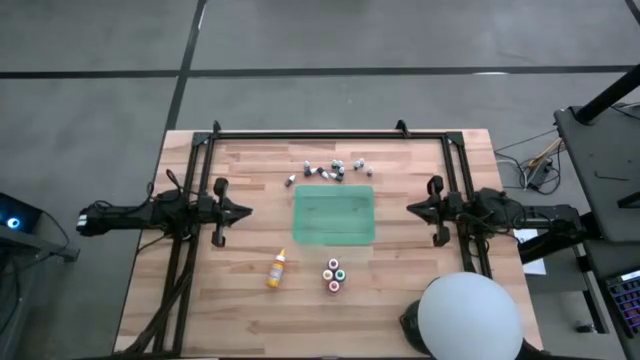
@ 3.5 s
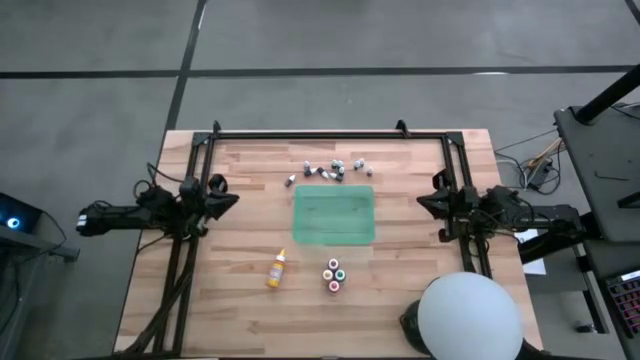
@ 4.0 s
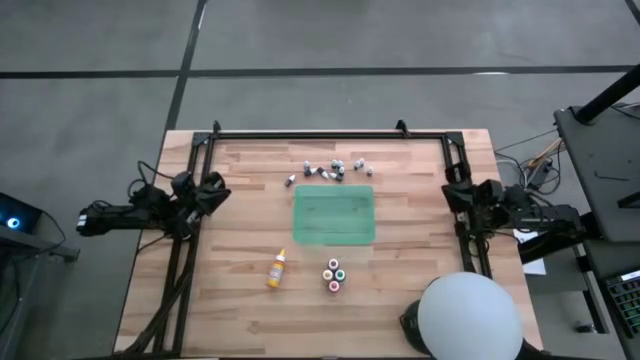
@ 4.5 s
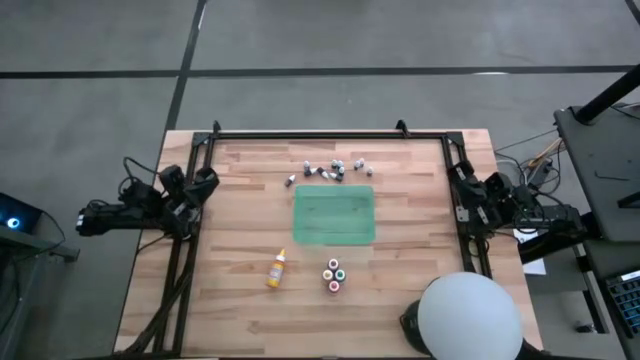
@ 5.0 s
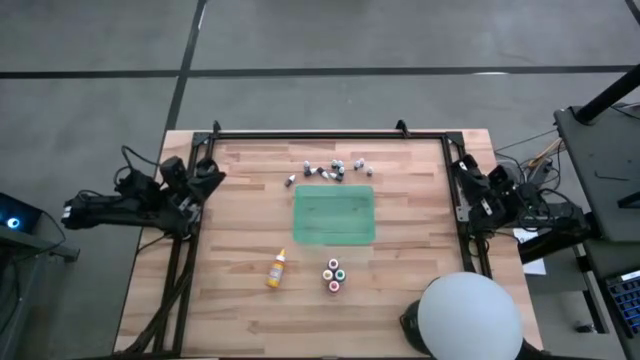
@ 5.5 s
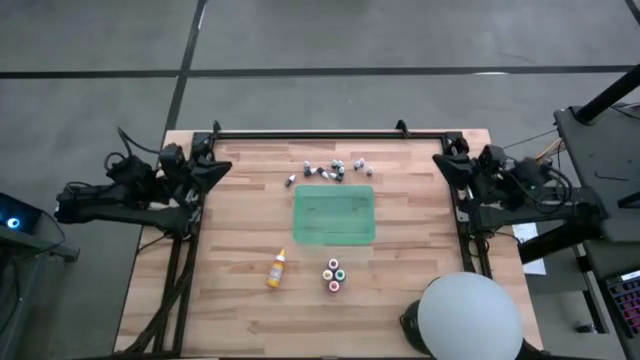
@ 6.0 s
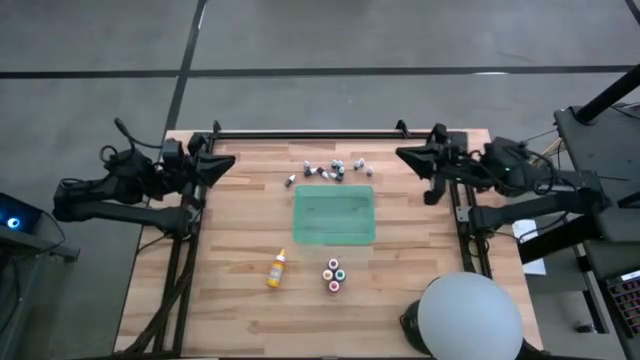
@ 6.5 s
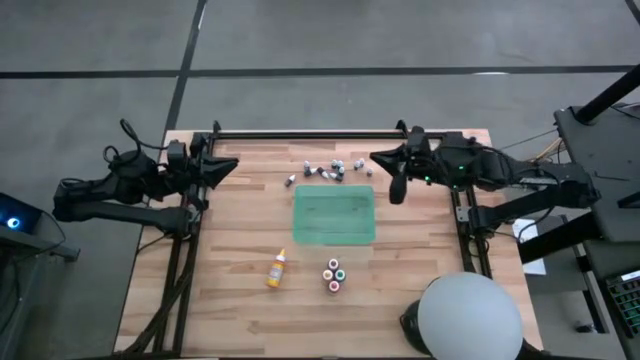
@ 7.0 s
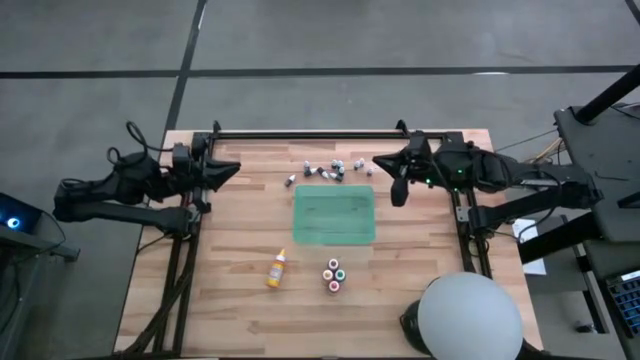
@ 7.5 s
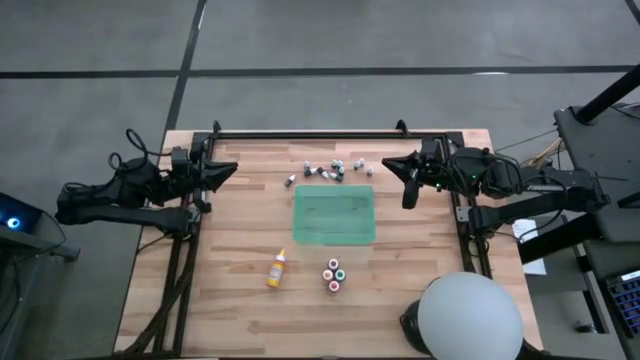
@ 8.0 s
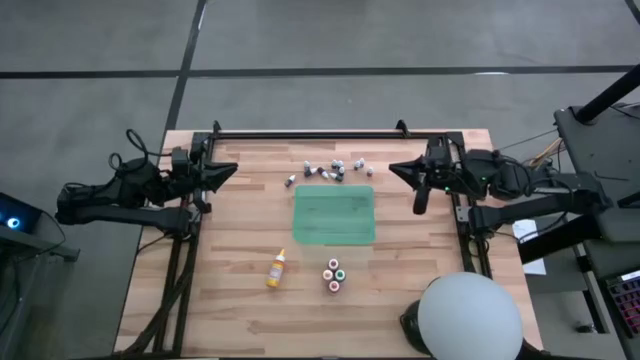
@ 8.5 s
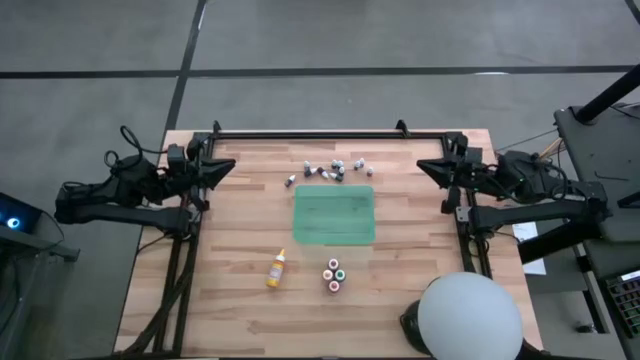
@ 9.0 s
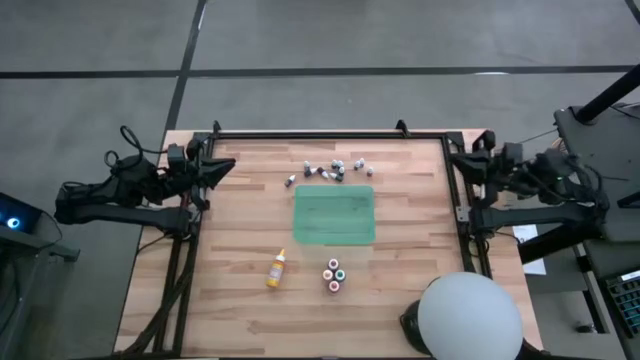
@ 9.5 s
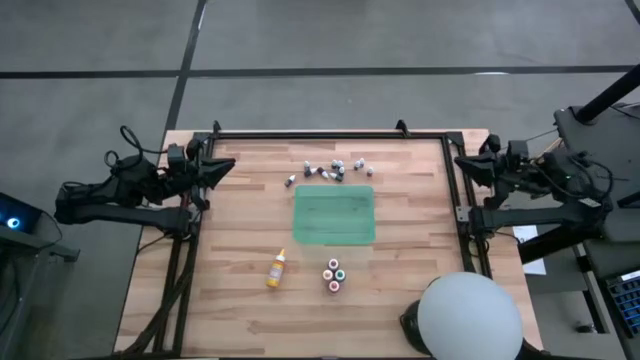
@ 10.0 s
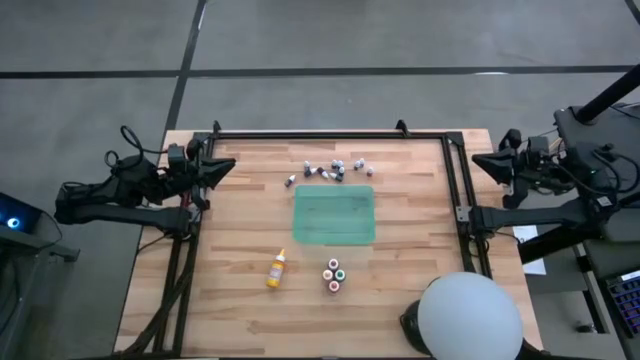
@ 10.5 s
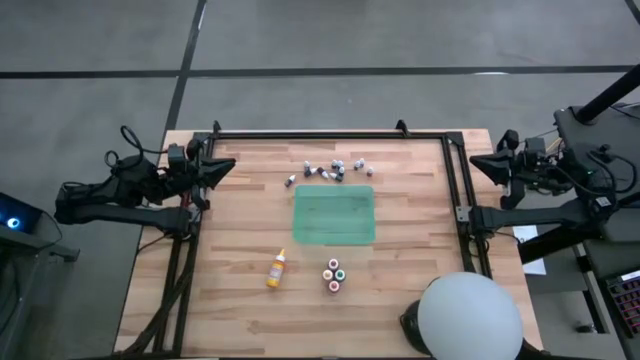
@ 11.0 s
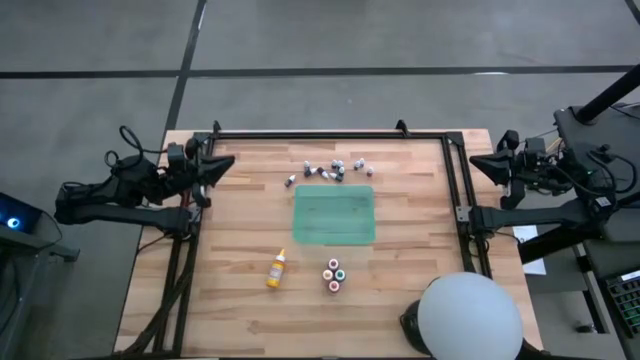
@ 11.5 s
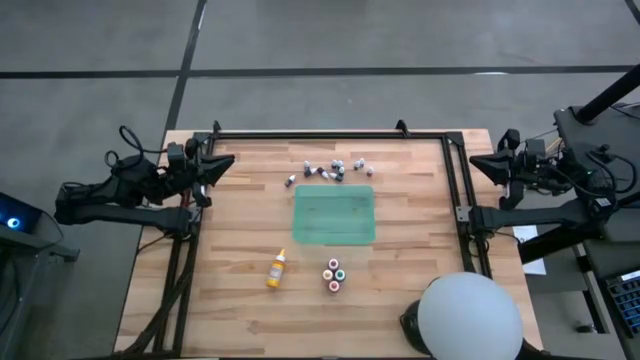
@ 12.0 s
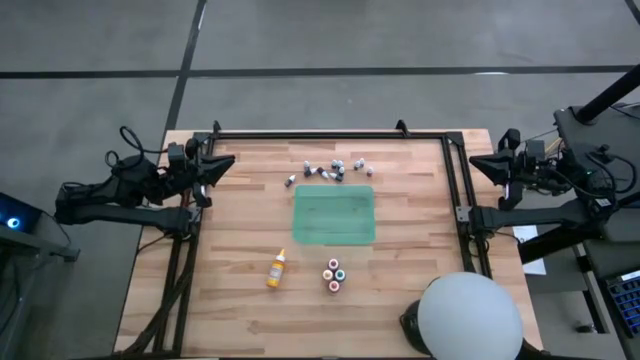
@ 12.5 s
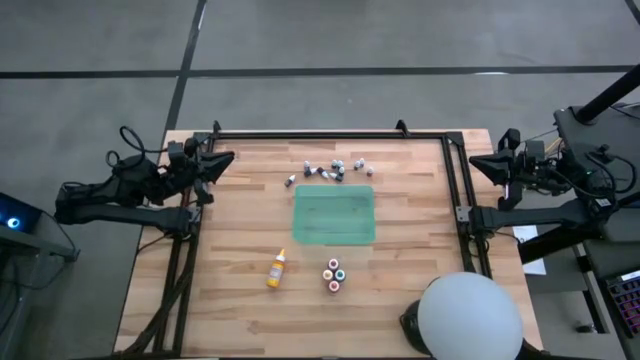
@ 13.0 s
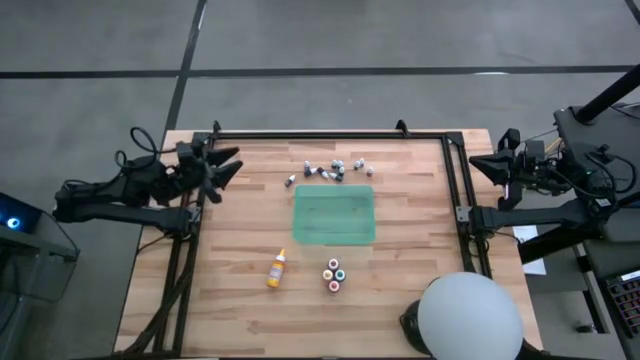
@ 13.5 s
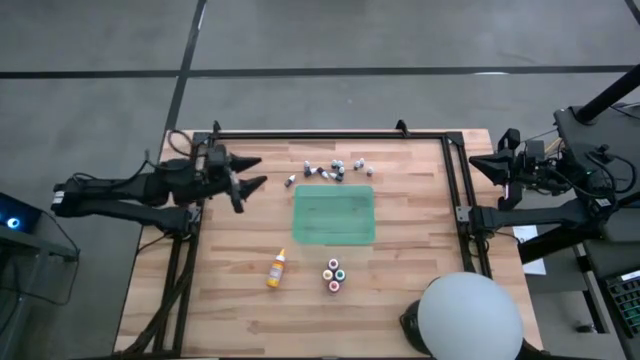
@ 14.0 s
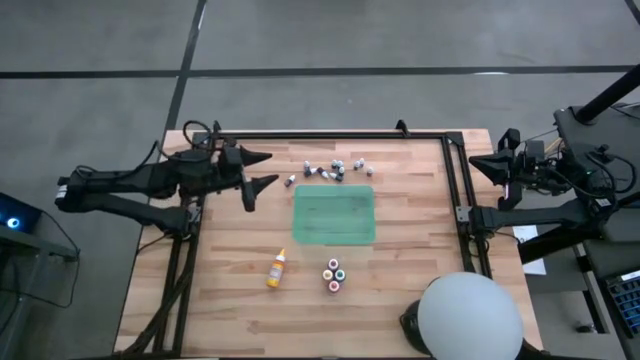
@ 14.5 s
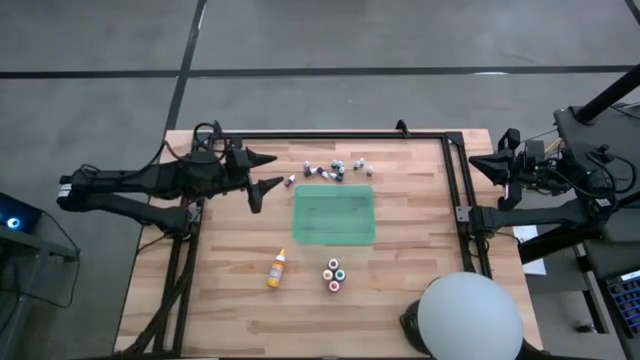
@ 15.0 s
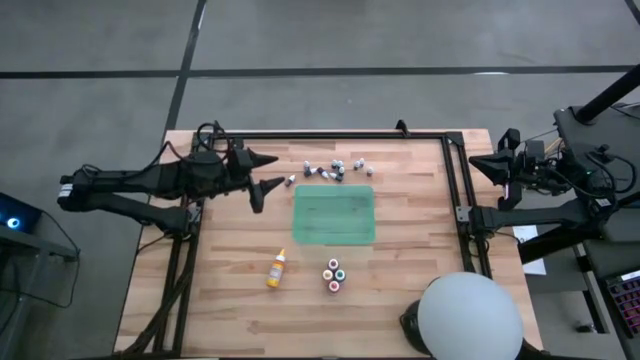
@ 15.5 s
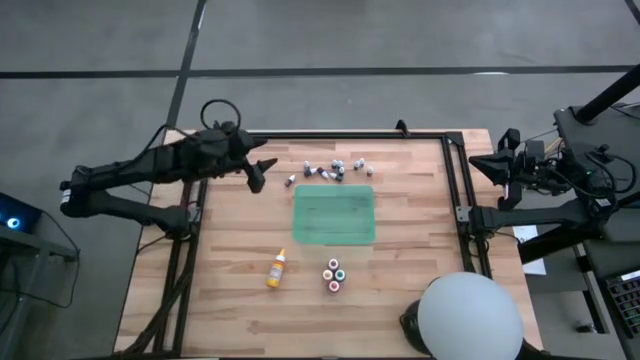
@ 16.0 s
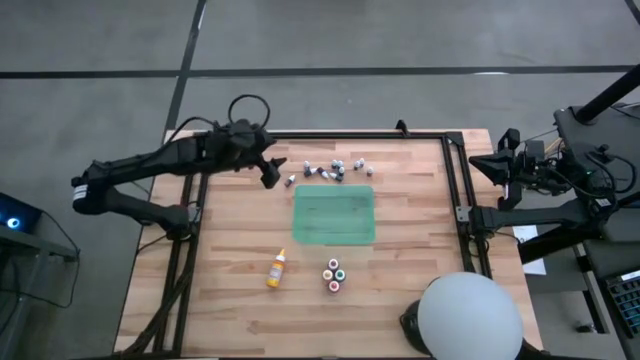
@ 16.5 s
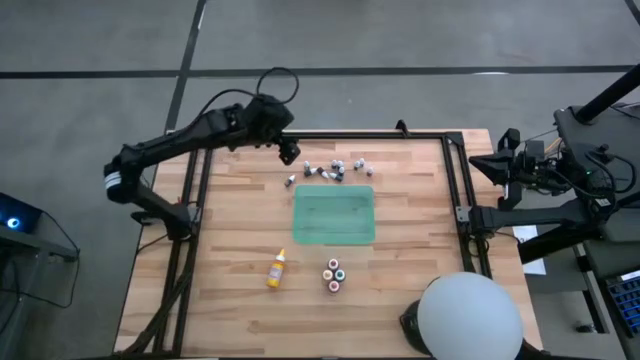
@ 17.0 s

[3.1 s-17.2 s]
Task: Pick & Place food coloring
Put the black food coloring bottle into the green container

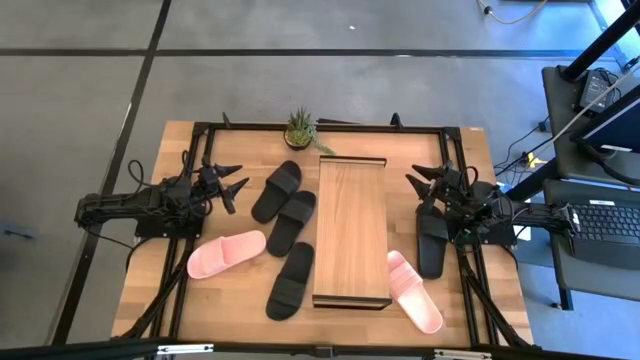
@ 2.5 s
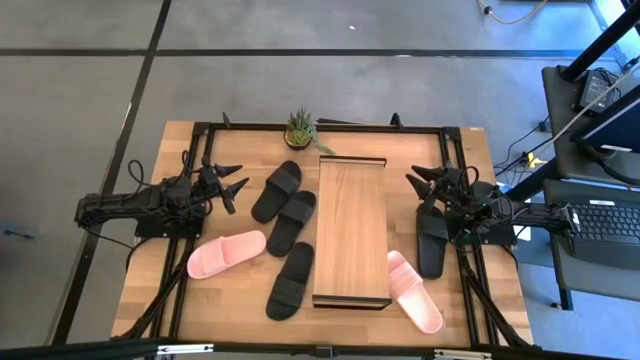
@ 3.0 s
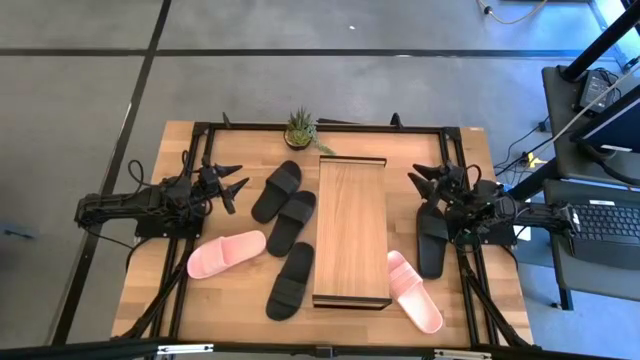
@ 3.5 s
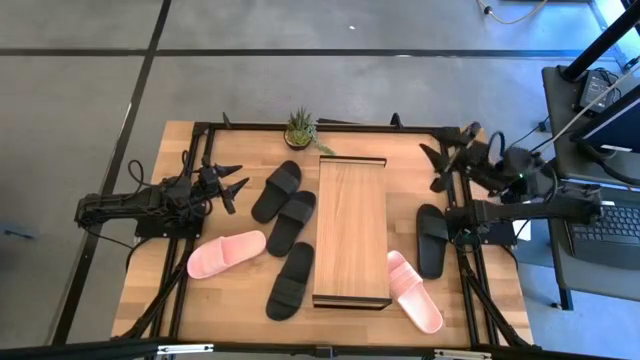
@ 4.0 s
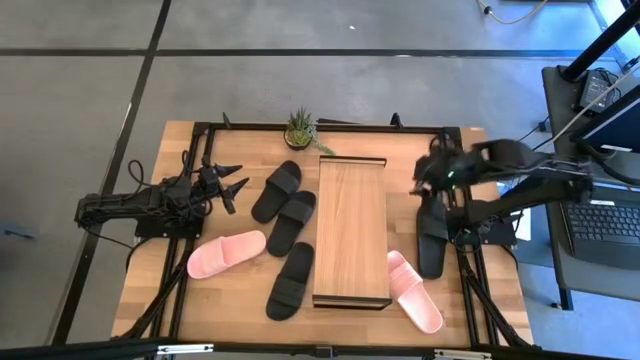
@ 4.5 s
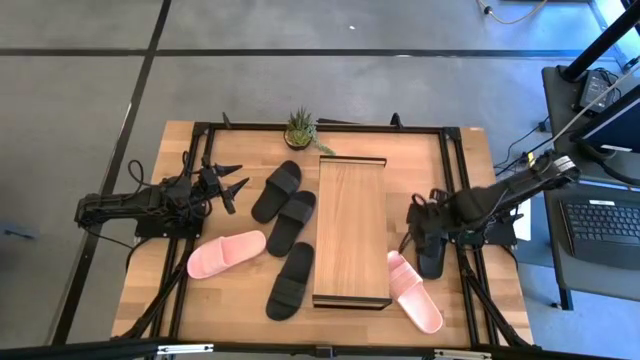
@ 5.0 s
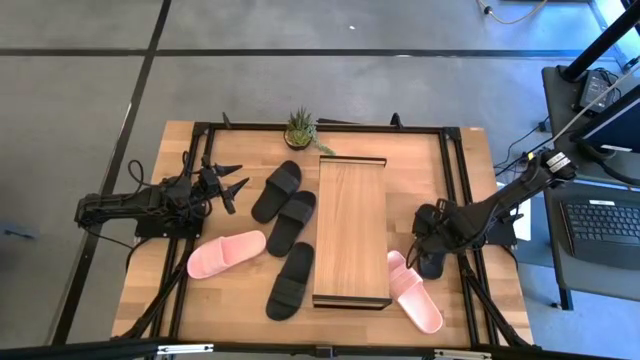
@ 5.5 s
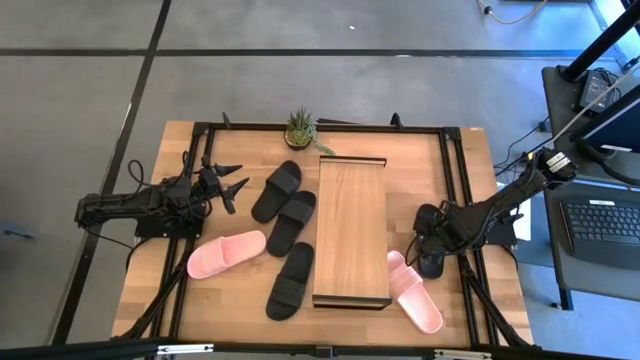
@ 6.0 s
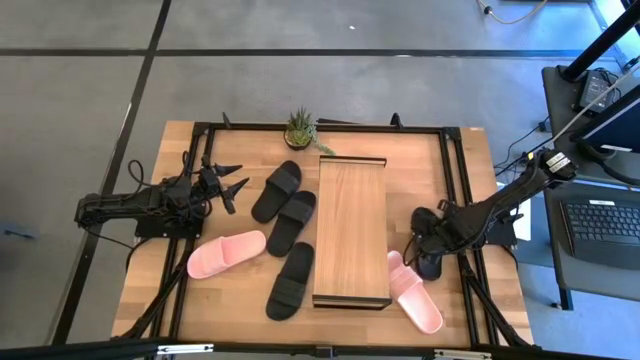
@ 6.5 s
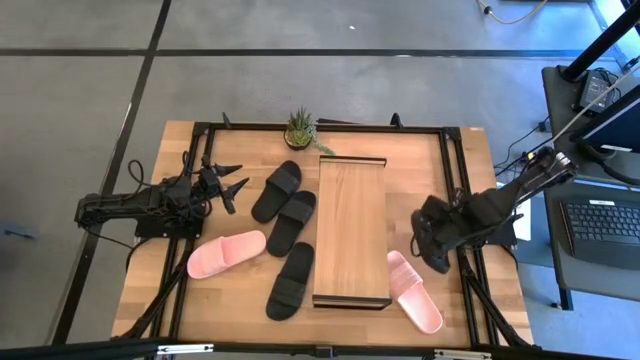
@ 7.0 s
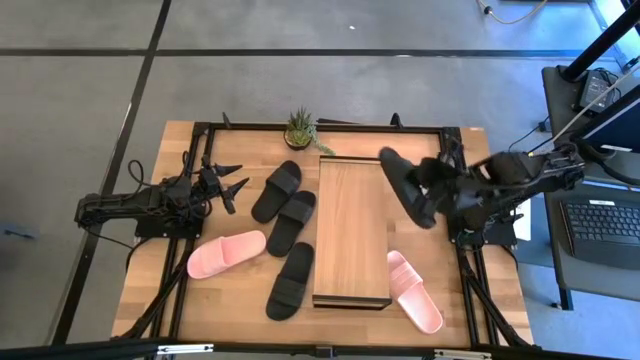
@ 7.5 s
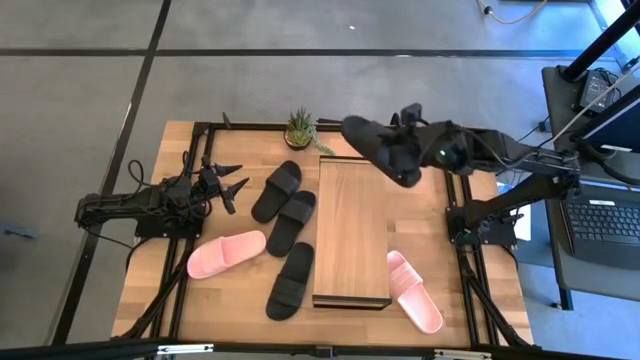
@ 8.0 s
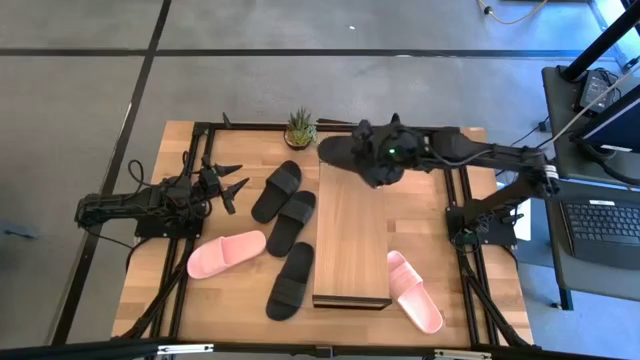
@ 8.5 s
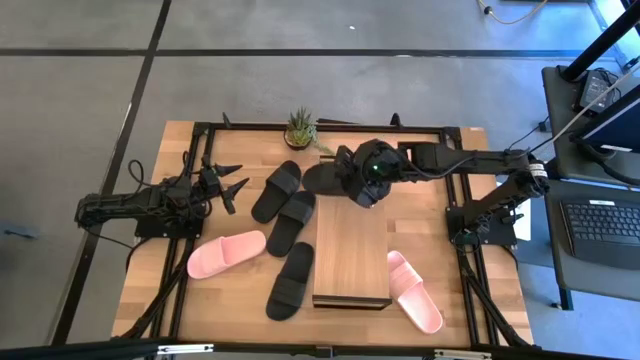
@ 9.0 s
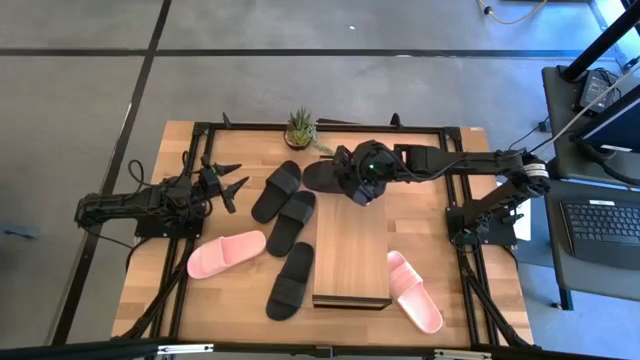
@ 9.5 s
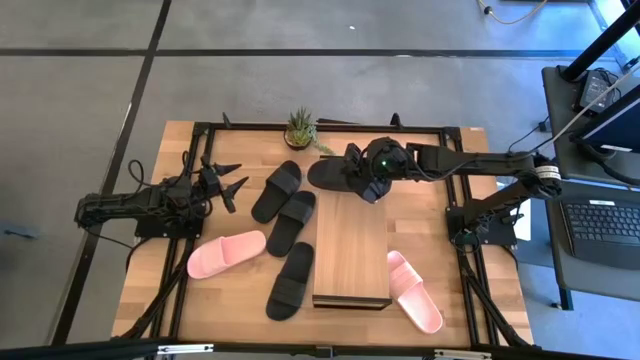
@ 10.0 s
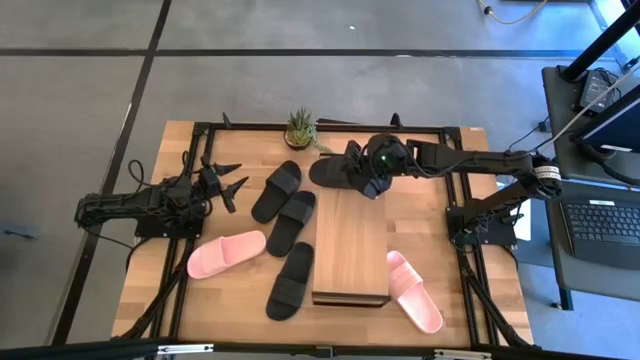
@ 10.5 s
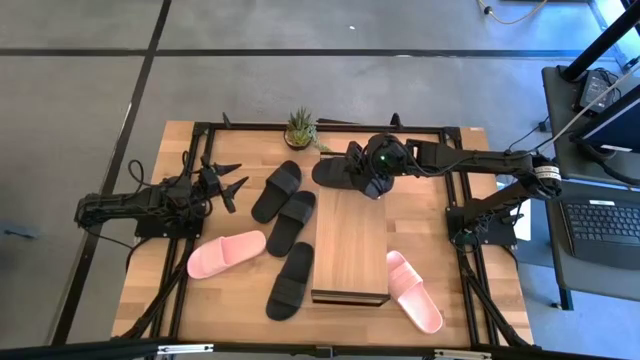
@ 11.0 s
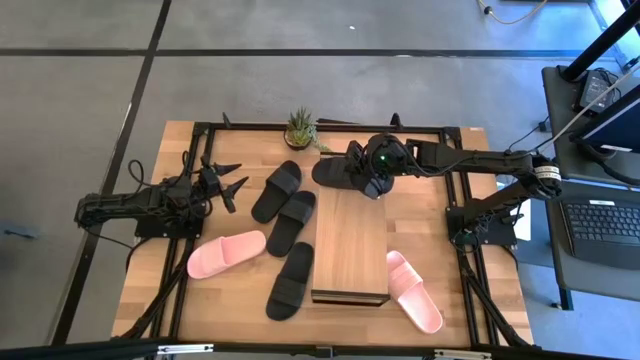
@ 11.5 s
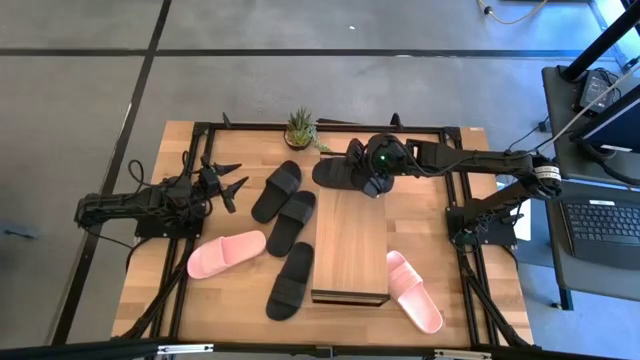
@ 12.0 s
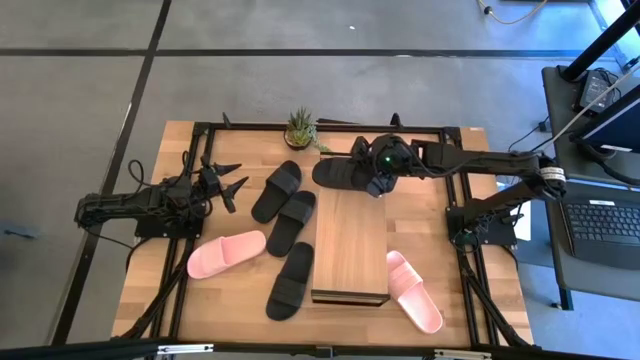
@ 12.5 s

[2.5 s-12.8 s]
Task: Pick and place slides into the shelf
Put the black slipper on the shelf
